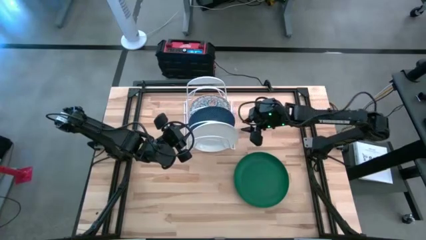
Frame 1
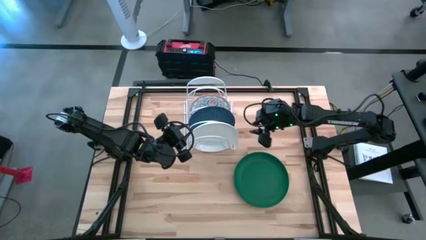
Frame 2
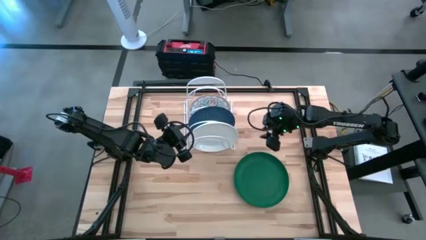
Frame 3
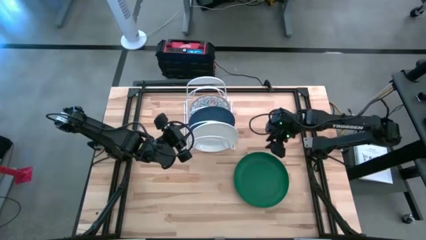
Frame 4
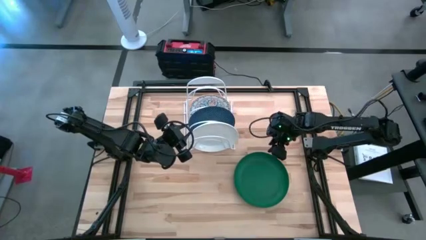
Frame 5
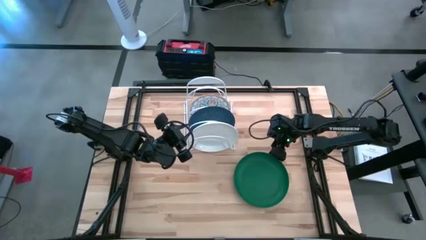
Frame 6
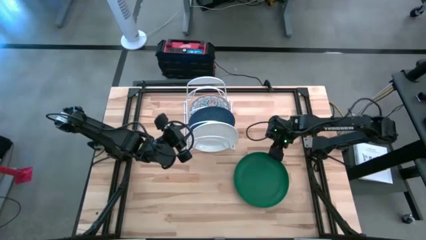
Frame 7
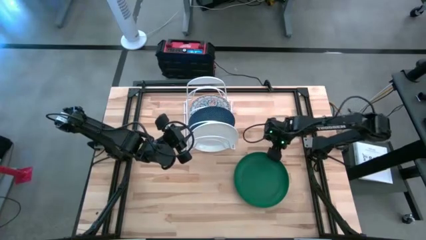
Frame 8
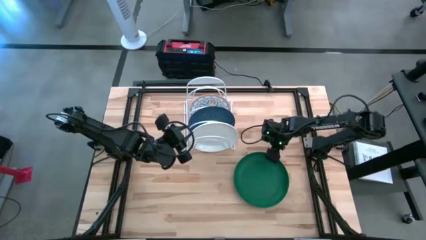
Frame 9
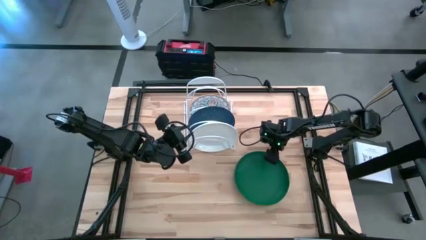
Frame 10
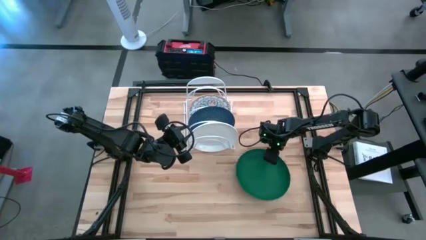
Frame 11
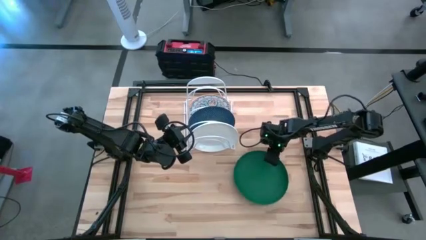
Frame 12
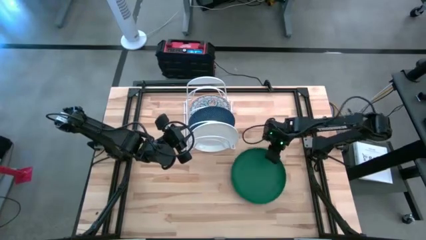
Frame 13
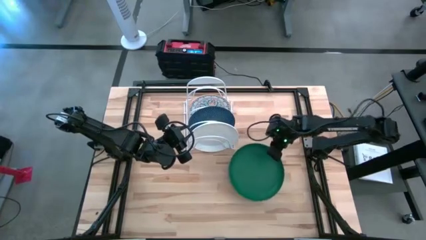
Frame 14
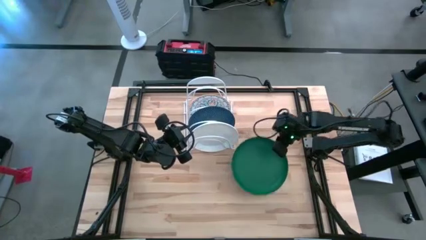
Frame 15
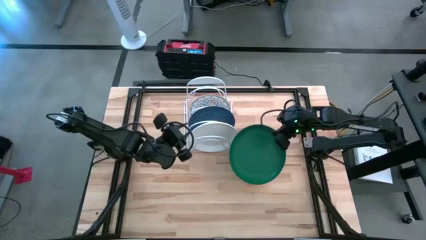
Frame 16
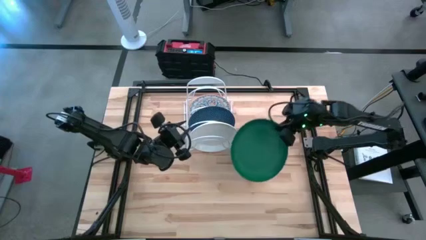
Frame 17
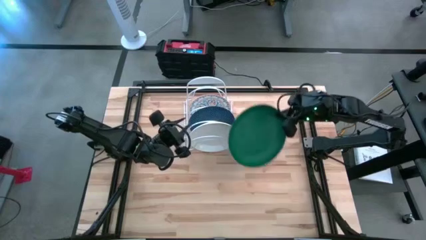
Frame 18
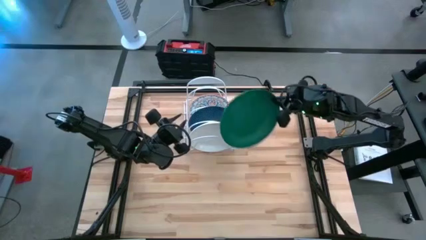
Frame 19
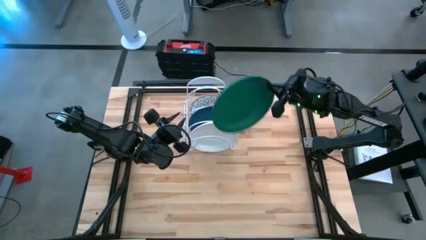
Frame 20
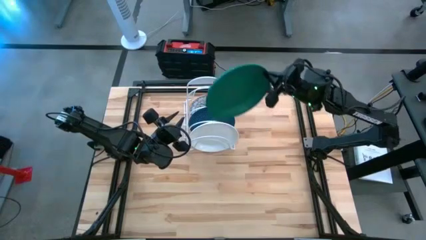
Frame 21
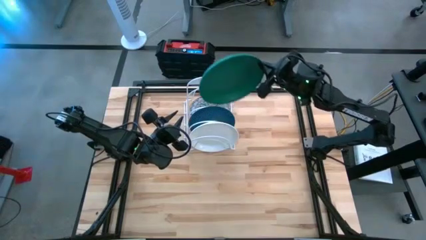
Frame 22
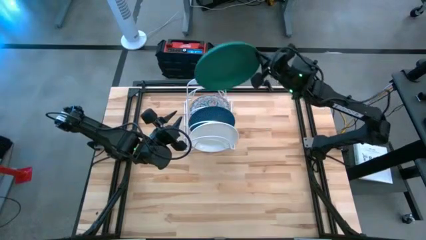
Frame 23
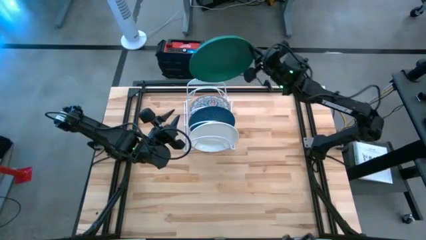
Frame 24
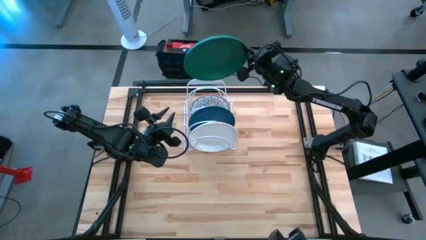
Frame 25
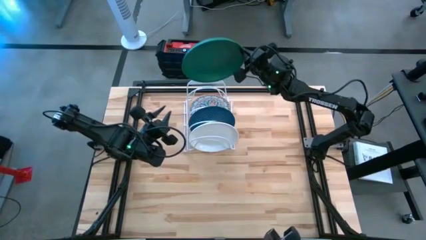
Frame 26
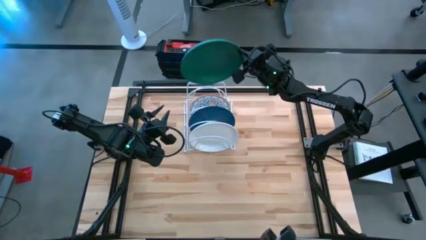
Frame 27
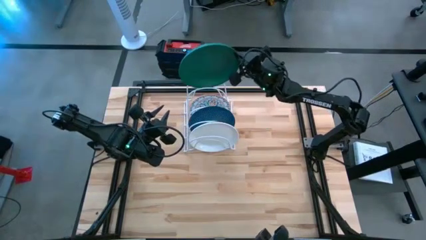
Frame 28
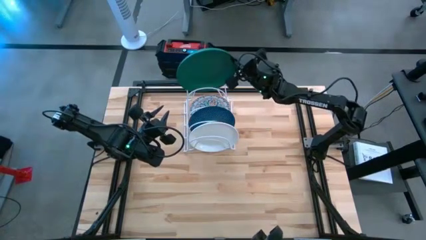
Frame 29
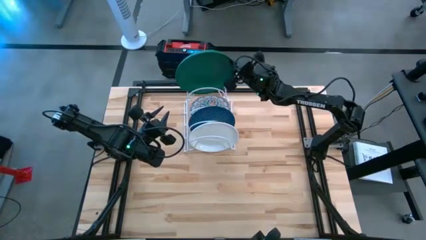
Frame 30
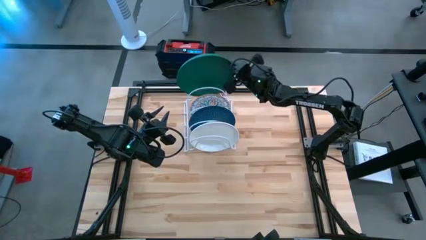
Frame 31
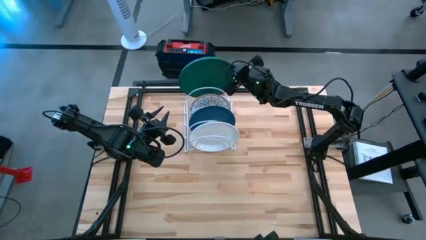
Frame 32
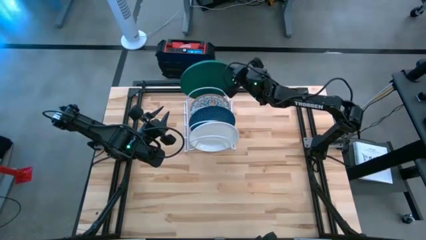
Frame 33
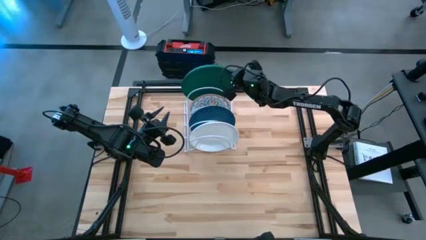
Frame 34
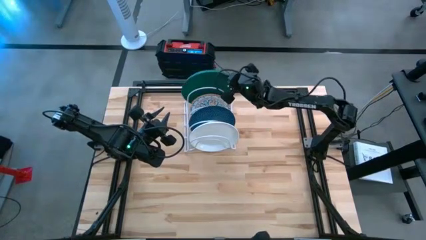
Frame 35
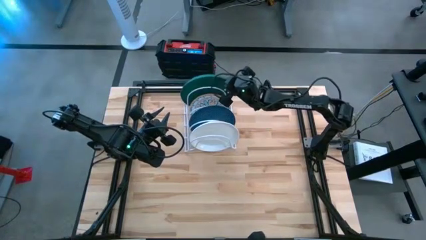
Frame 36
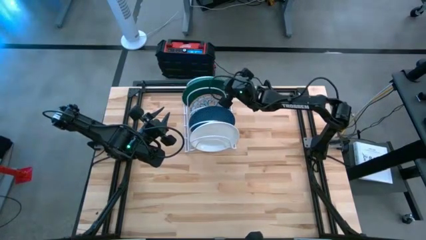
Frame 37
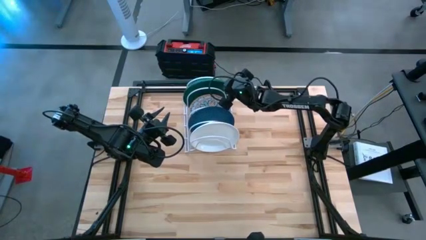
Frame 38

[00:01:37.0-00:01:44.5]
Task: Sort dishes
Put the green plate into the dish rack

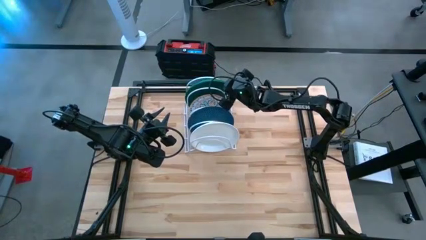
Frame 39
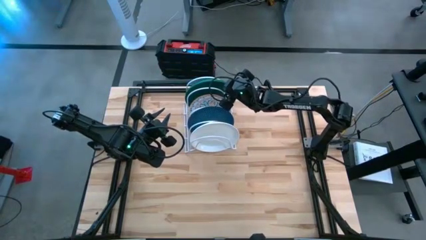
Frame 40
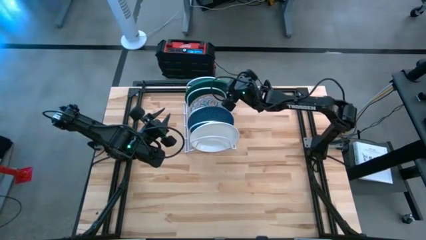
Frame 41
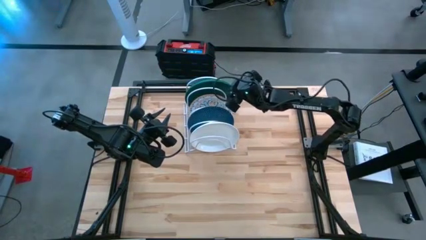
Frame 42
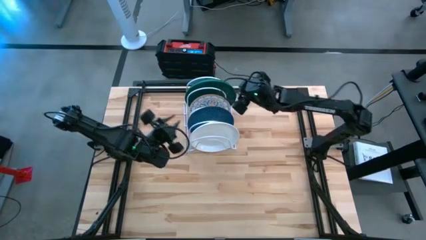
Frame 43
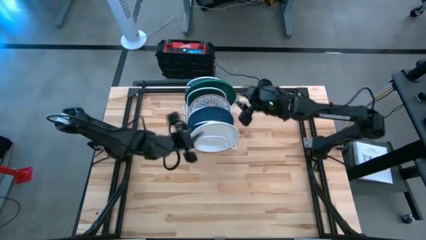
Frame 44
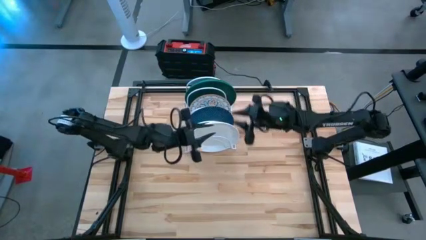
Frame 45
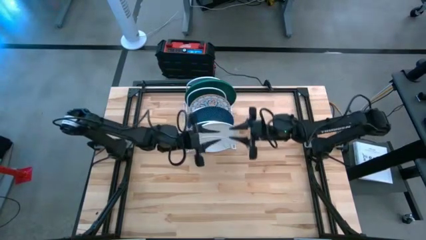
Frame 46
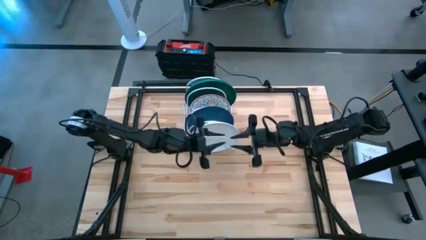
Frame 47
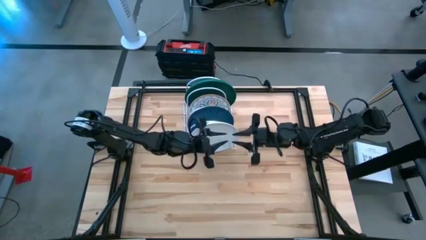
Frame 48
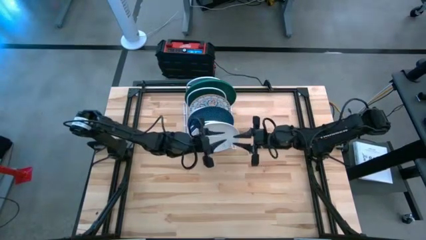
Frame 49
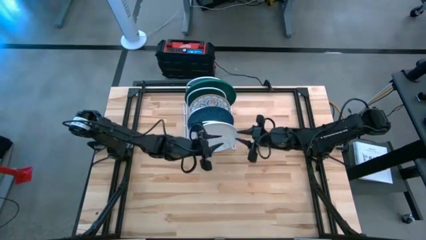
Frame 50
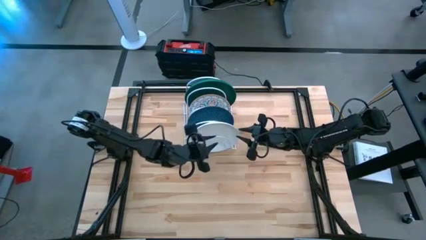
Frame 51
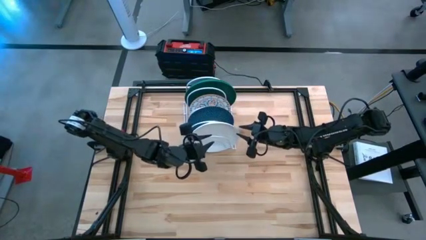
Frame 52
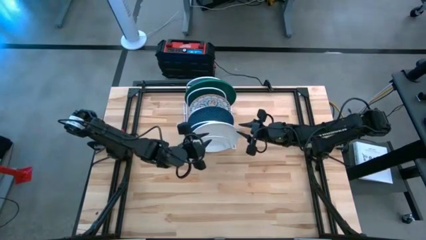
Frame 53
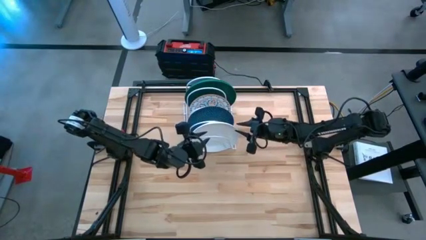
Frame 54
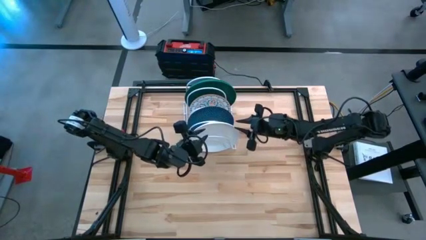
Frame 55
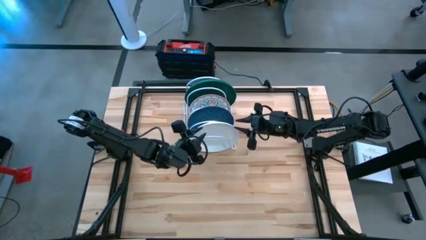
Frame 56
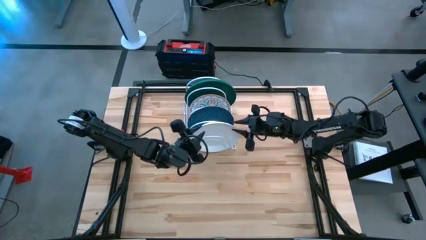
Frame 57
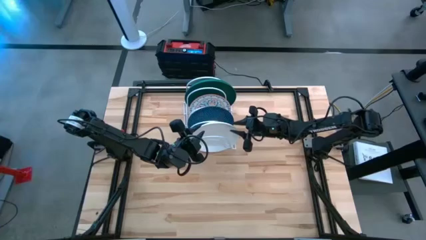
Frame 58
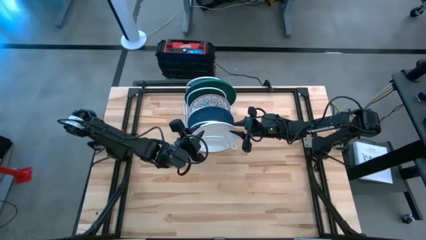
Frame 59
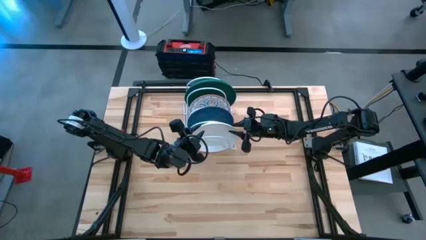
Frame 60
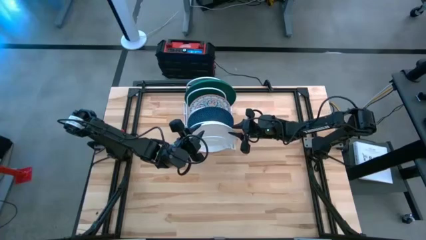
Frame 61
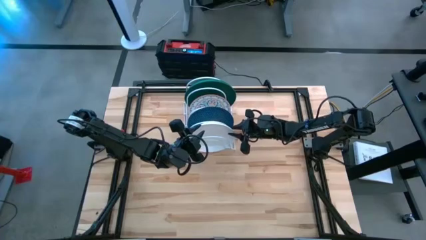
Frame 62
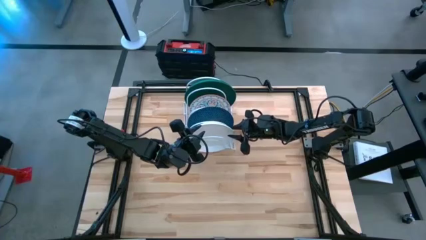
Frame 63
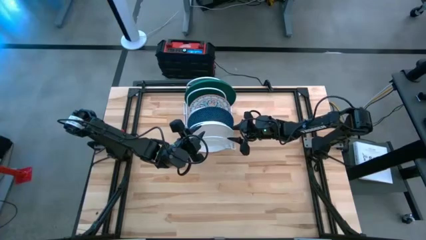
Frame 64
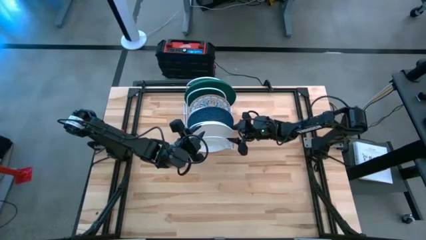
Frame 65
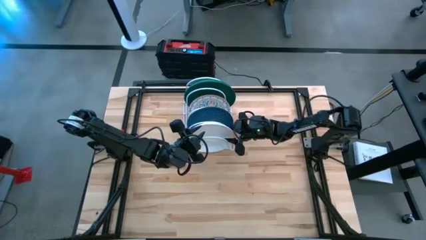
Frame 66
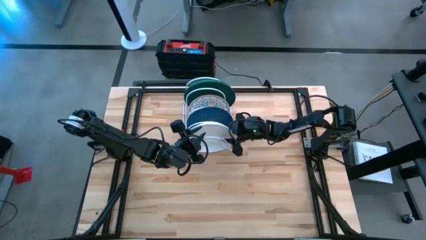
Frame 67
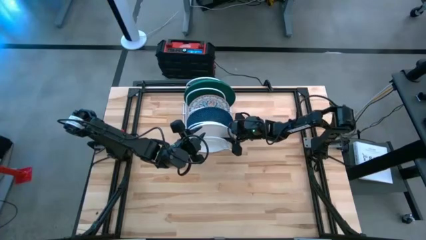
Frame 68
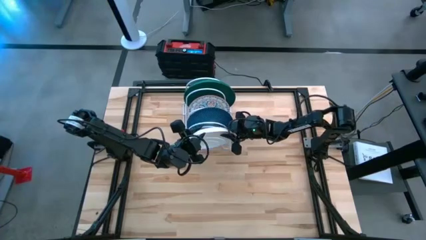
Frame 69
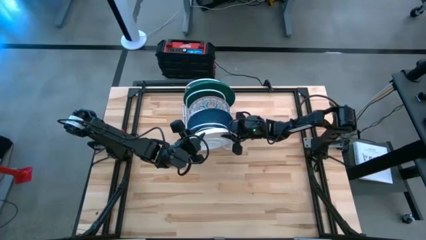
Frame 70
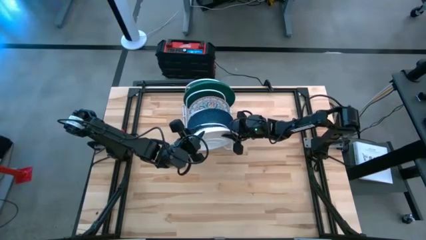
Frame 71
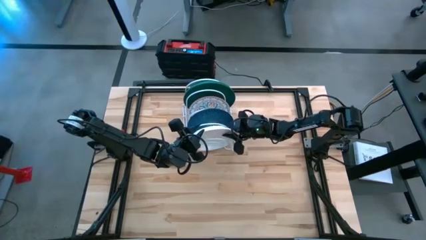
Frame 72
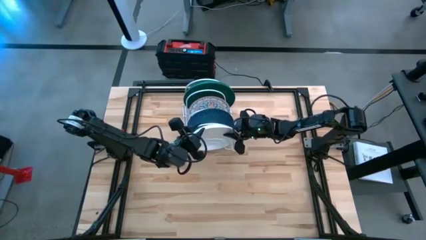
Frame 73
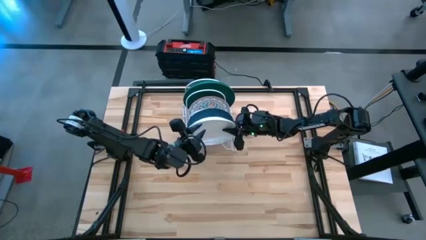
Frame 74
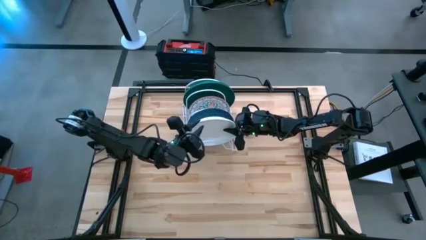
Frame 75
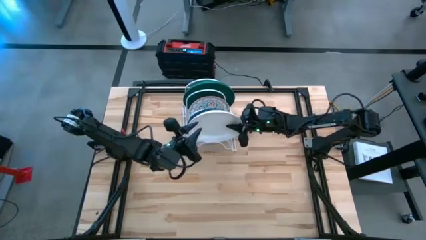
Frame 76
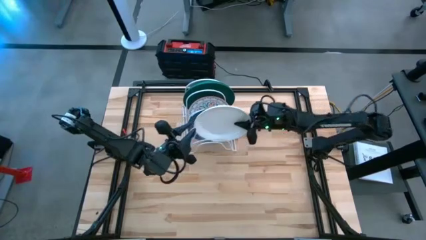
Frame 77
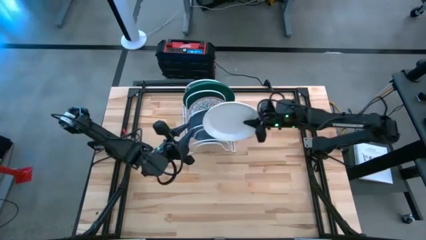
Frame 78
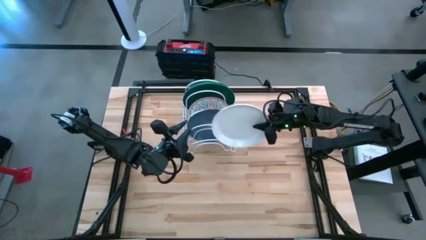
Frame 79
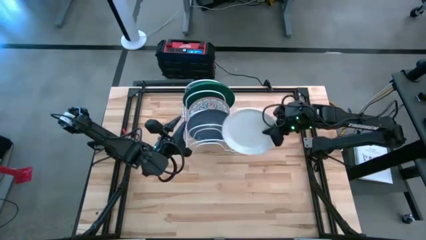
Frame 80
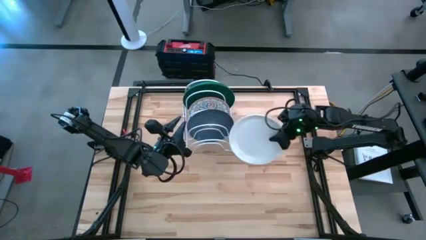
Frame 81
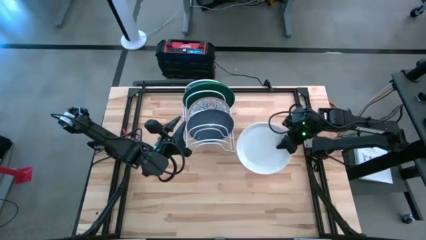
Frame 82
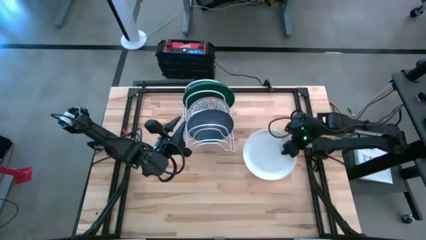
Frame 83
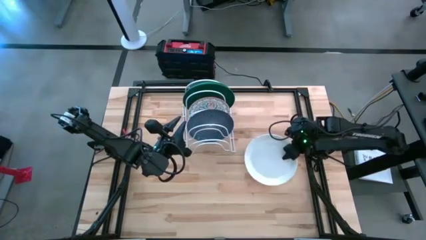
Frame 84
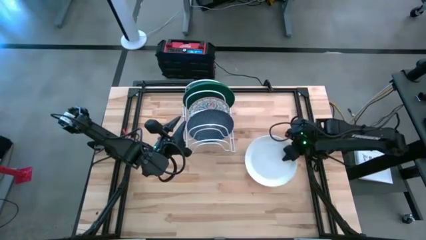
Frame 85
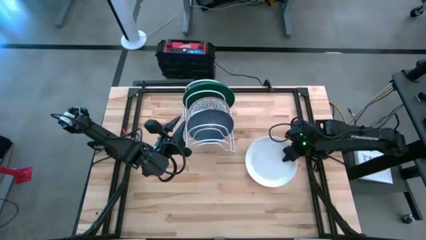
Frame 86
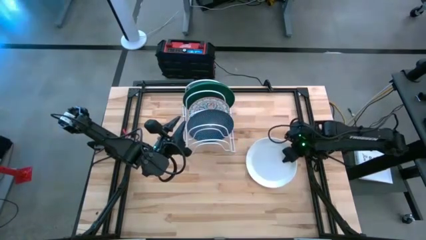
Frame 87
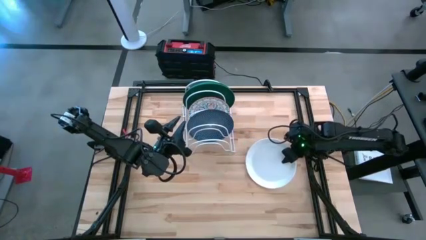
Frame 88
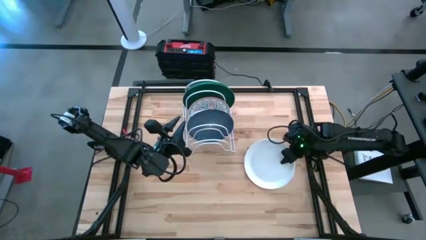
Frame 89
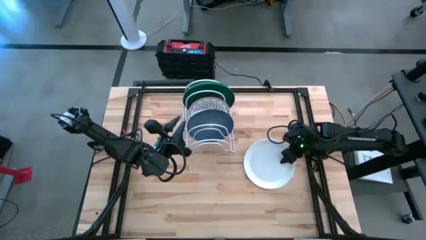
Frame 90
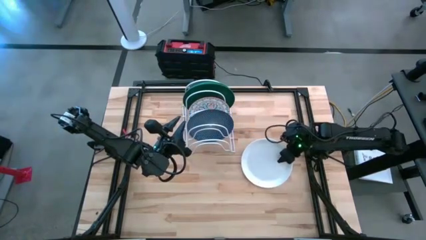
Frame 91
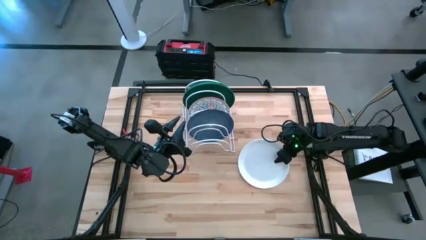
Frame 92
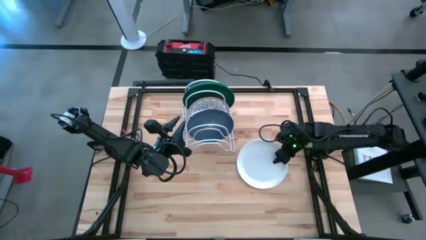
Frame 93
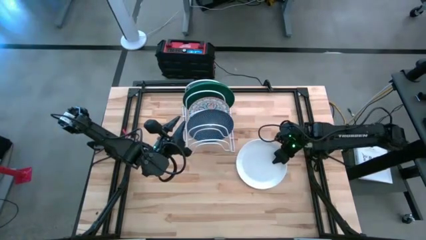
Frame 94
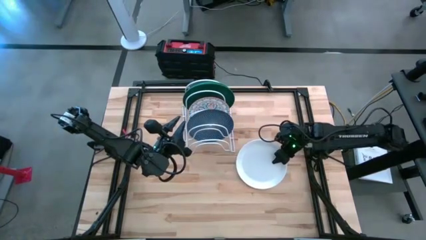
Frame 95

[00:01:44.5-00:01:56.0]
Remove the white plate from the dish rack
